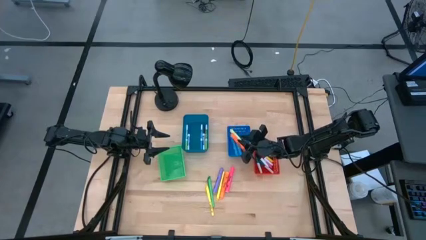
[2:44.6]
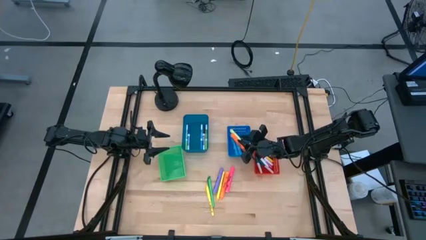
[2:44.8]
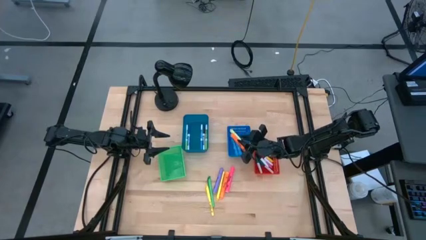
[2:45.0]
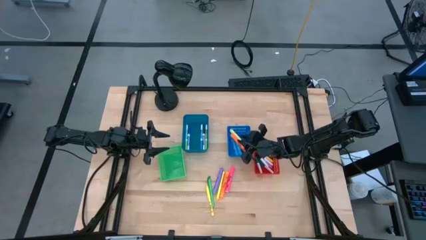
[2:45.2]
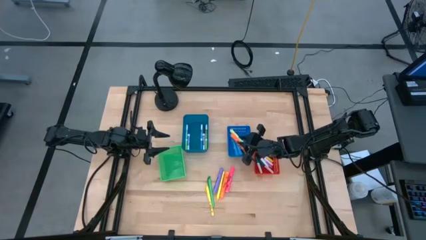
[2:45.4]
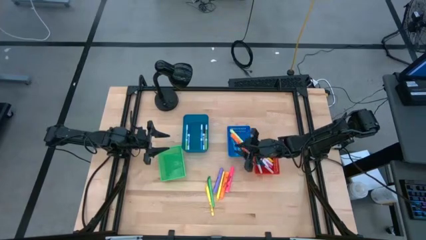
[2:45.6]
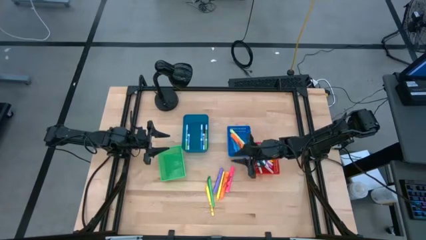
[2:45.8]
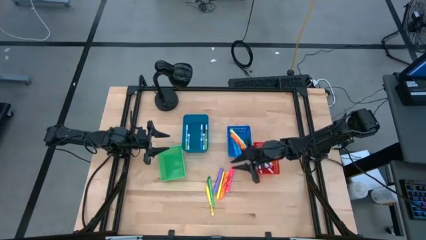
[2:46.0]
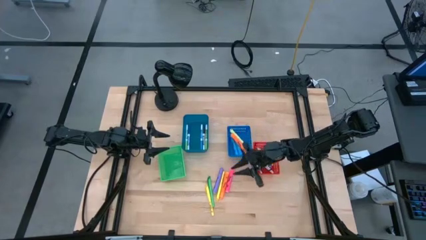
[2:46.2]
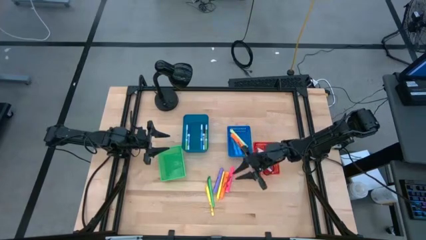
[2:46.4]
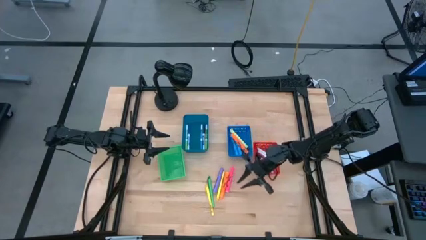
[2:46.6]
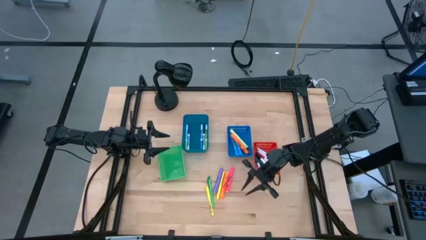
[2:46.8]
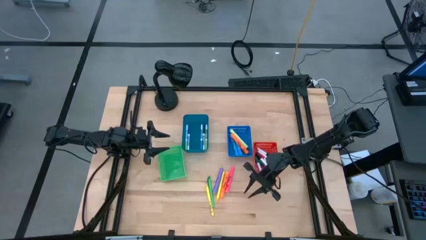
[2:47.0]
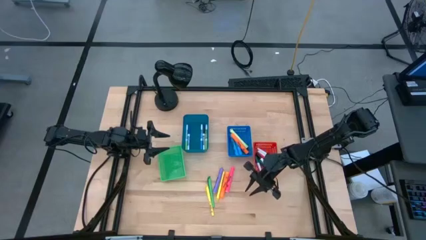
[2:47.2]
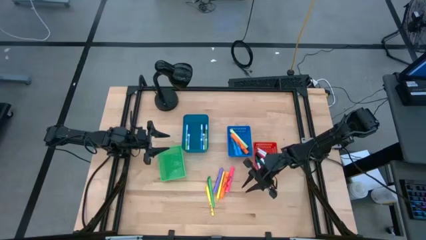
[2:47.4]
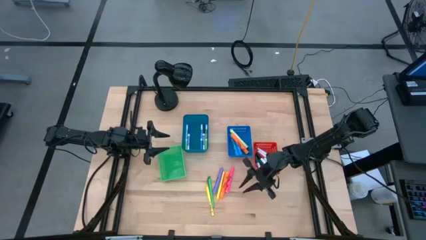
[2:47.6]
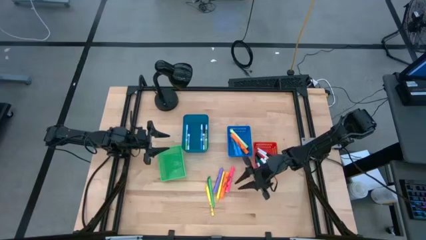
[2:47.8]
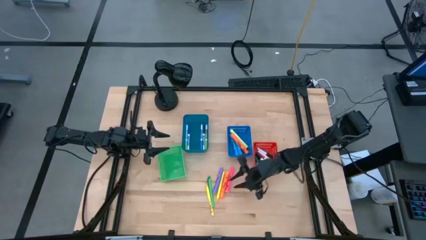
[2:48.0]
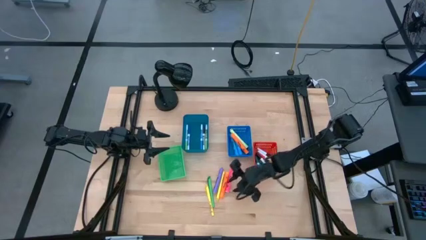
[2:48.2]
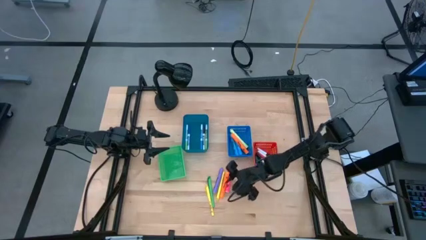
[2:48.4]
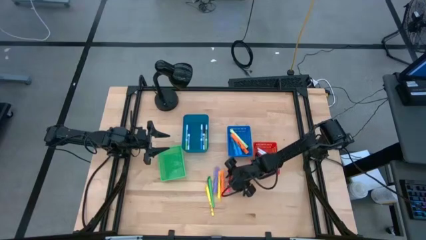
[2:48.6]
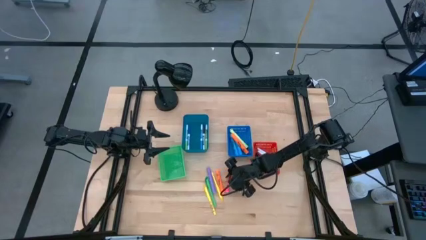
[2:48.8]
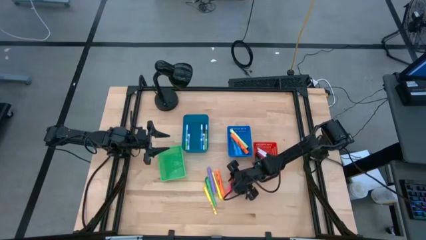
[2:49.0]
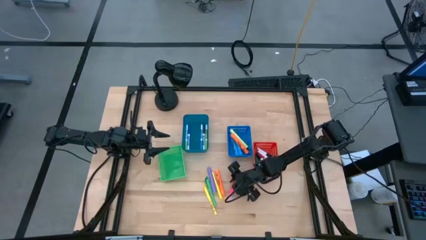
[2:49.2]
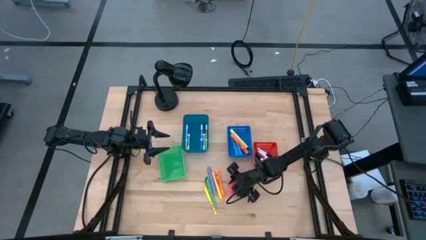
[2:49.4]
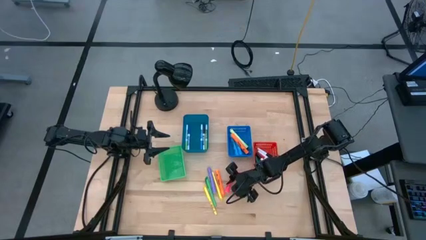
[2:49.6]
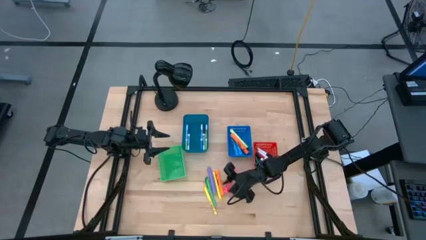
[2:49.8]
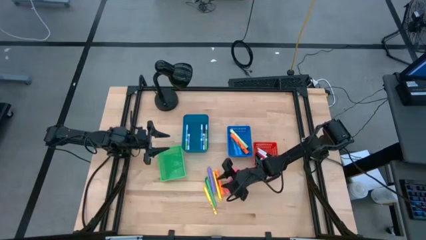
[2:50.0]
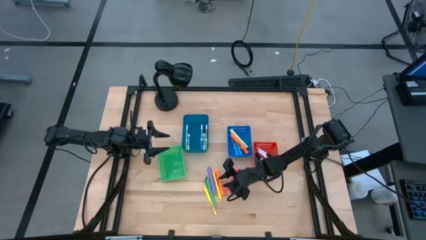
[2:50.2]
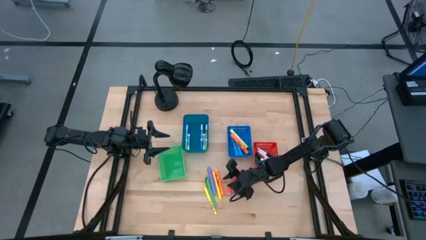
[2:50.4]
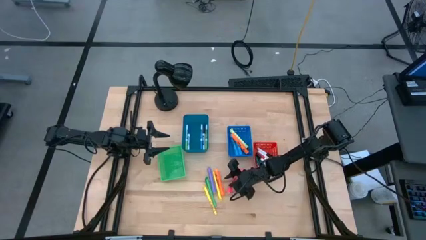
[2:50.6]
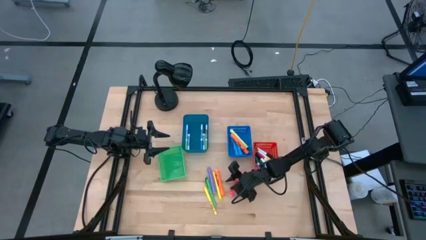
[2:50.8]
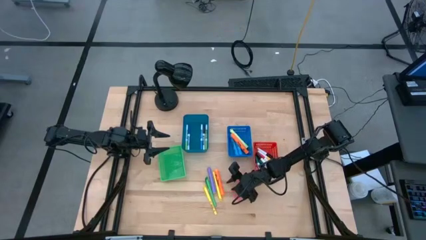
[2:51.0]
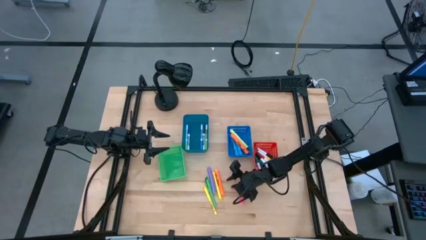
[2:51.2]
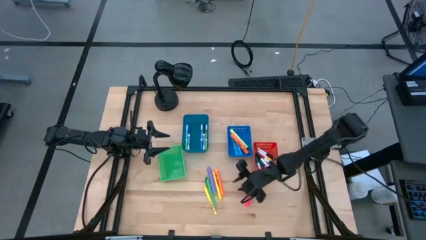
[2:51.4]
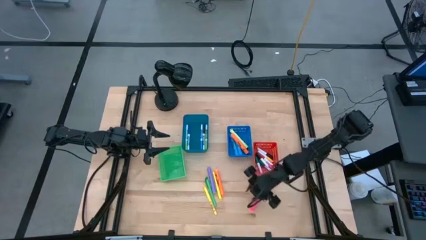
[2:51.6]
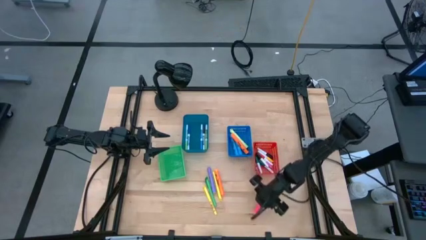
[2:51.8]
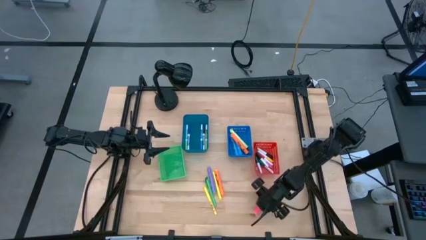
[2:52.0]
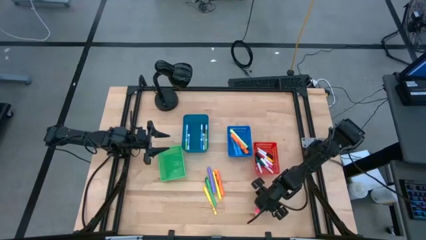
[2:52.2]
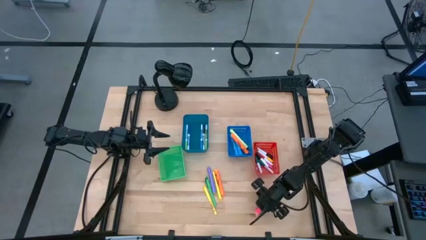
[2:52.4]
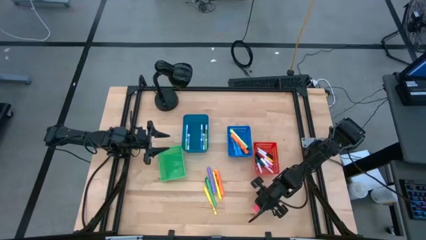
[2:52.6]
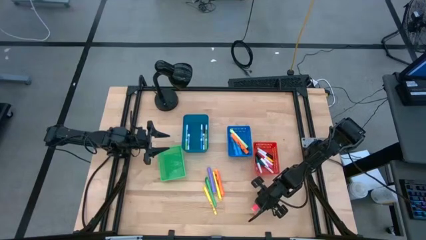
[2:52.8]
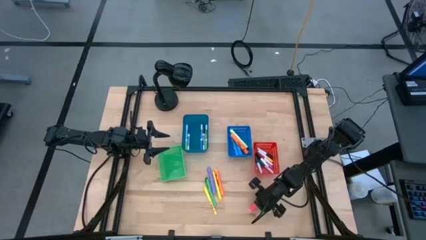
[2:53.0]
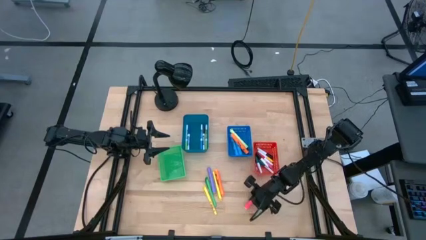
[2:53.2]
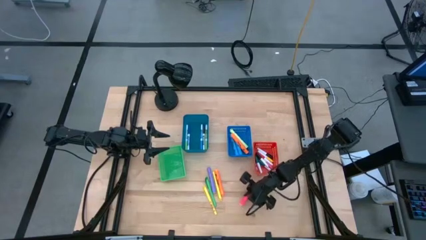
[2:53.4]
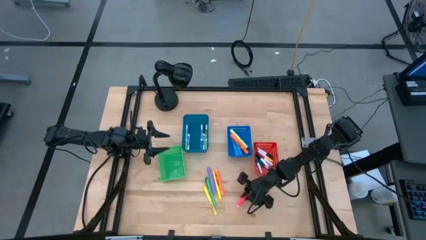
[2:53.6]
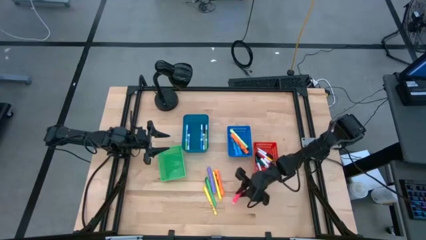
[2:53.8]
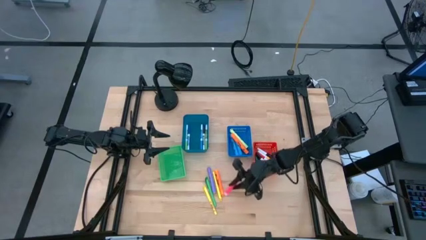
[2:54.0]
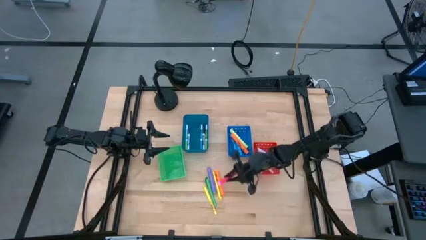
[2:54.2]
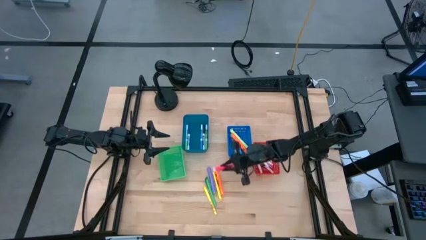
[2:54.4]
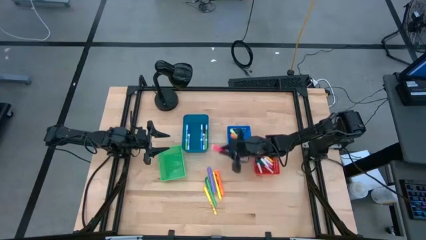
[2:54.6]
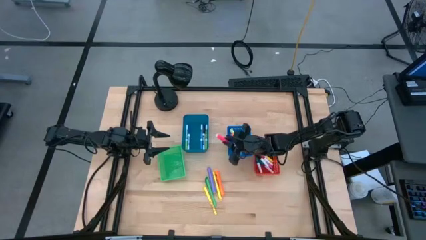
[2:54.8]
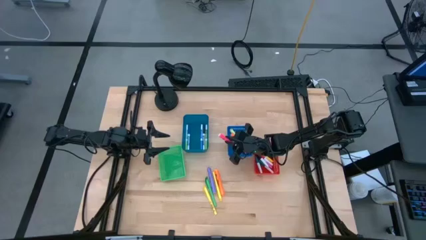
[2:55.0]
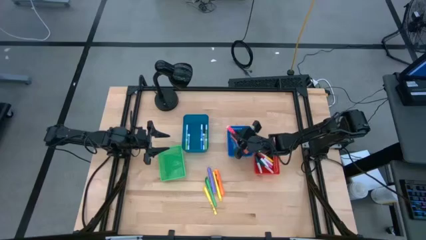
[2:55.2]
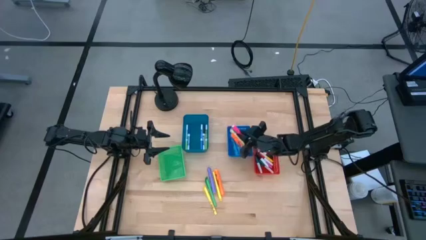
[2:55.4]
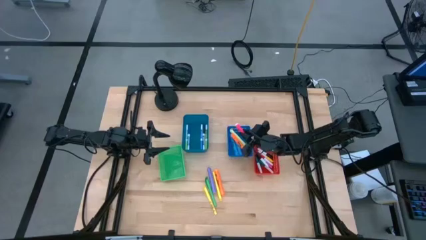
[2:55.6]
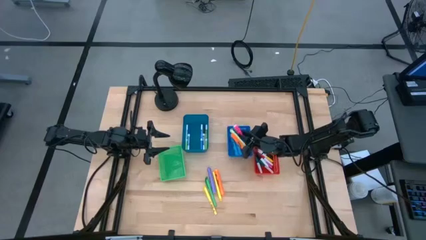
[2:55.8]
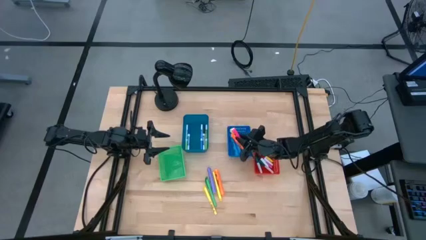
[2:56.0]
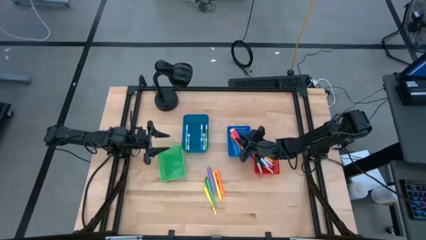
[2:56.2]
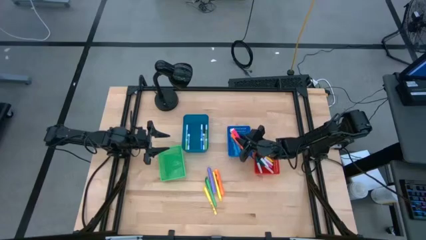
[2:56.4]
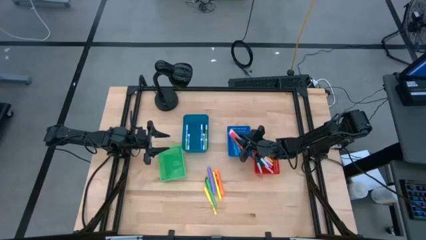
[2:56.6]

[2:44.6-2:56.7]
Task: Pick & Place Markers
Put the pink highlighter pen into the blue bin

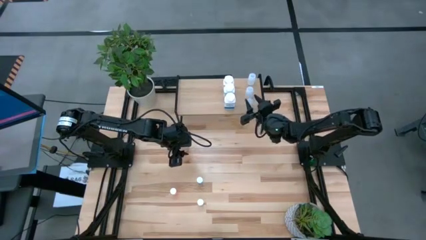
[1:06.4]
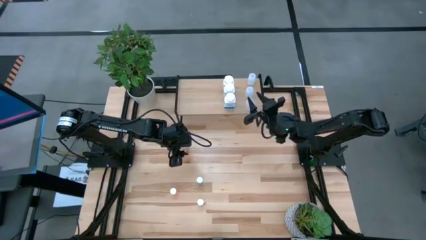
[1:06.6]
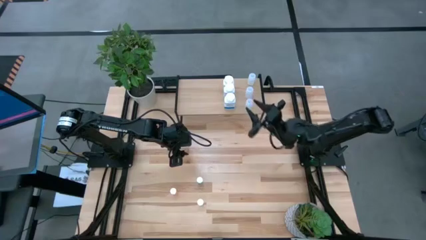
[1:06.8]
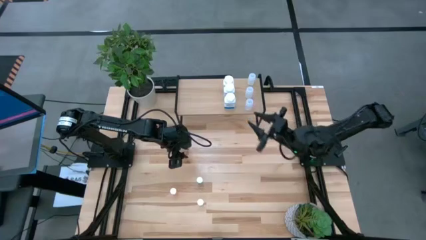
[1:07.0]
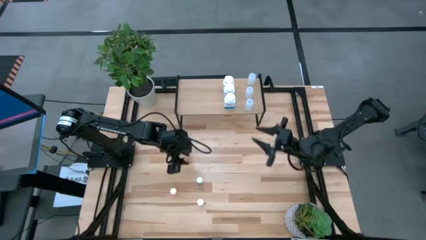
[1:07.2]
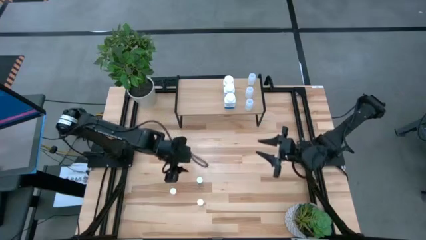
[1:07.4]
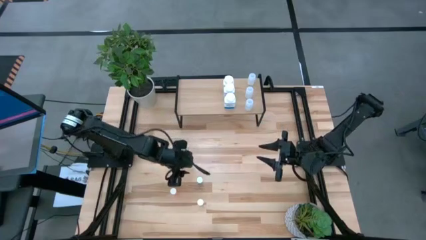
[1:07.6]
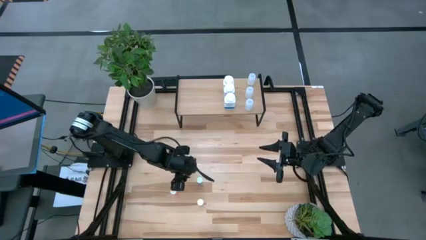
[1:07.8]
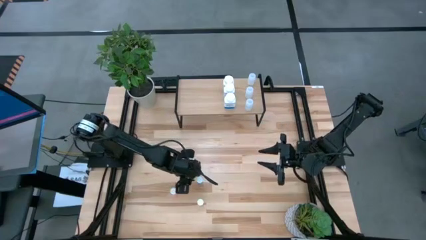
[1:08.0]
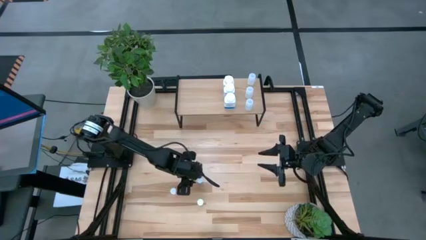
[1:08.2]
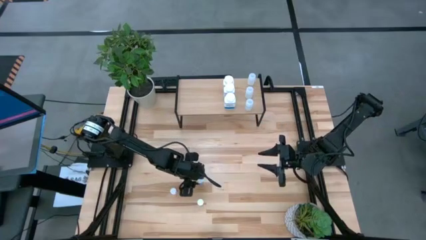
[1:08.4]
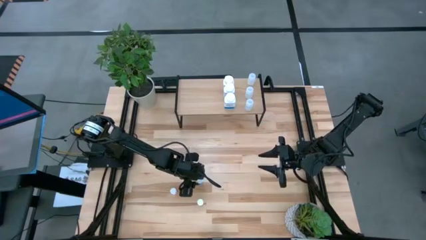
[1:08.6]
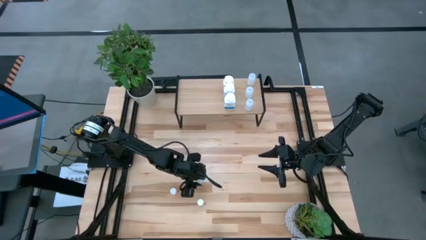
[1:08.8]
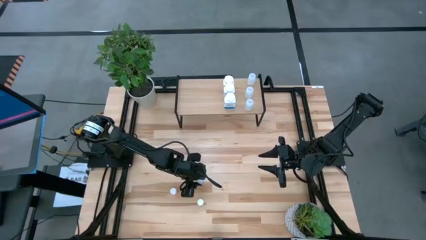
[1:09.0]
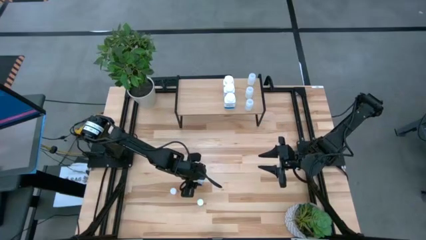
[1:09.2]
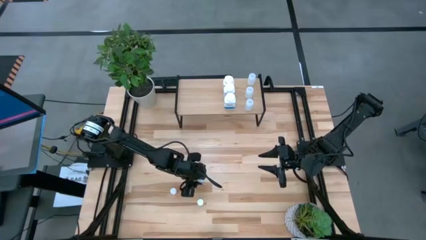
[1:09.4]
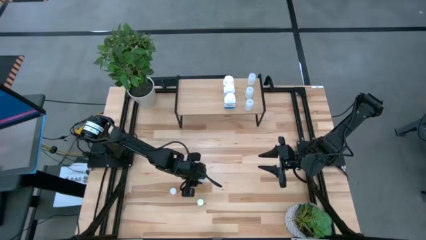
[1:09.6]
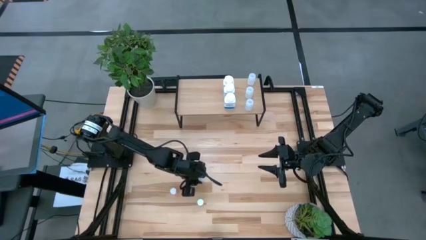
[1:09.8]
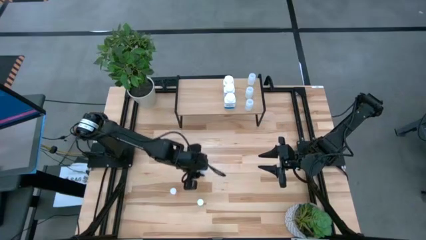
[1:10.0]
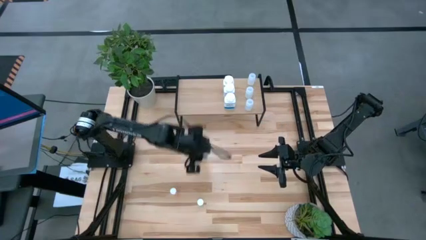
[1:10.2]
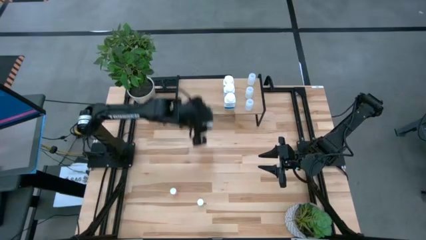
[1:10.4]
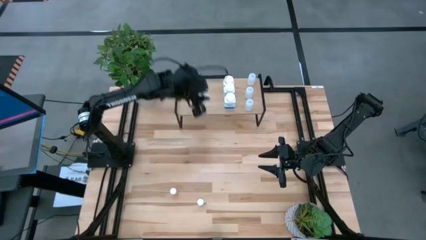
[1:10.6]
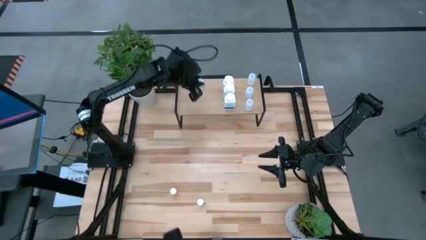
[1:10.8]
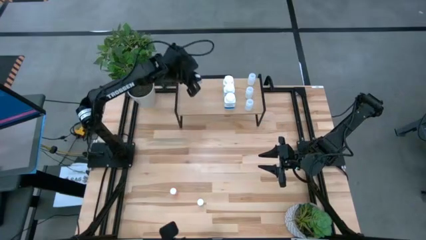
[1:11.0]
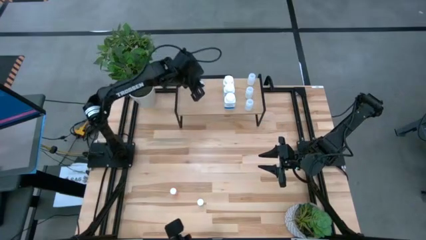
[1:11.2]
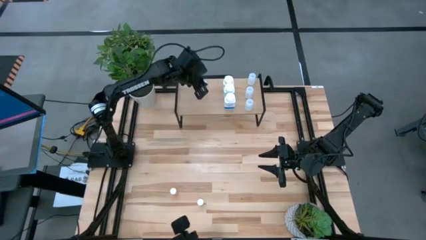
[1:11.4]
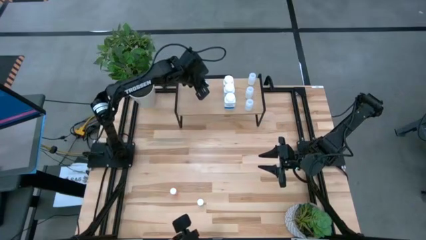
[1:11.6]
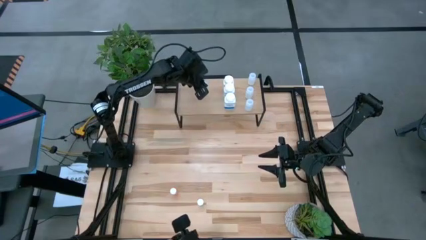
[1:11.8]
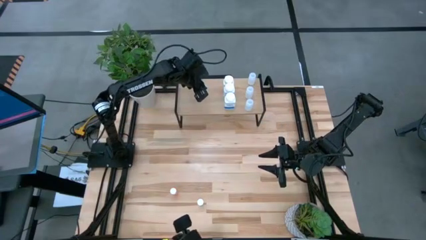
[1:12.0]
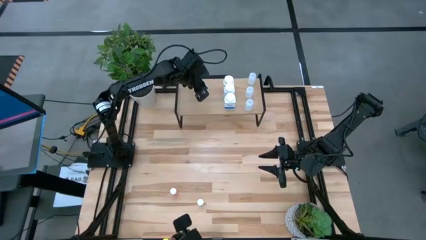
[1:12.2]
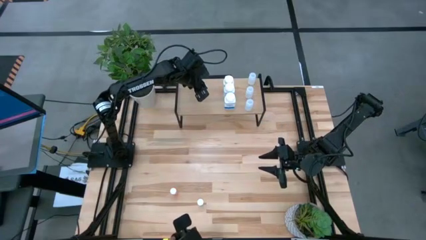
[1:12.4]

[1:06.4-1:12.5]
Task: Pick and place medicine bottles onto shelf by color
Put the blue bottle on the shelf
